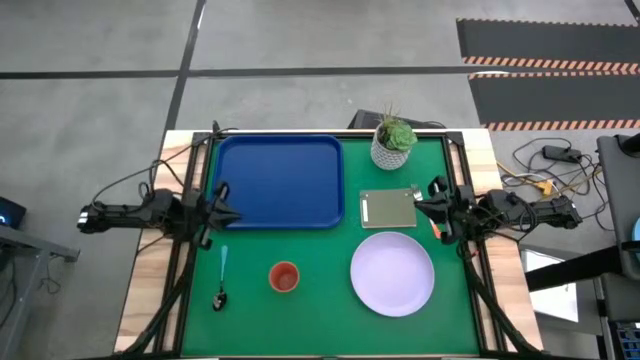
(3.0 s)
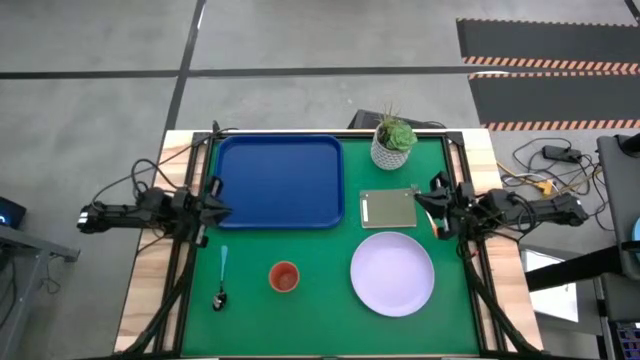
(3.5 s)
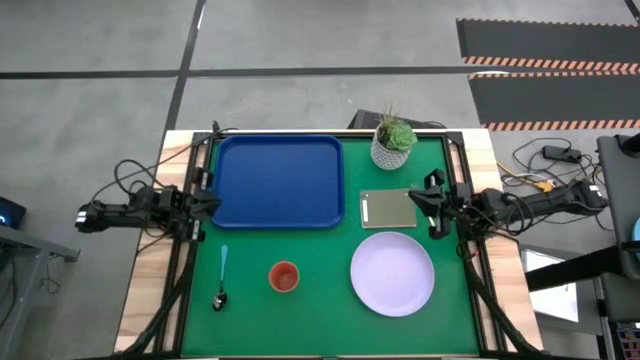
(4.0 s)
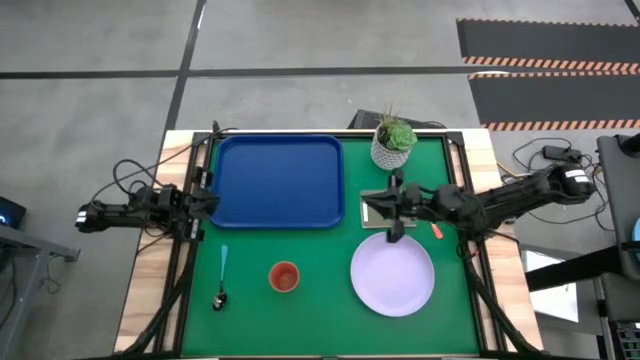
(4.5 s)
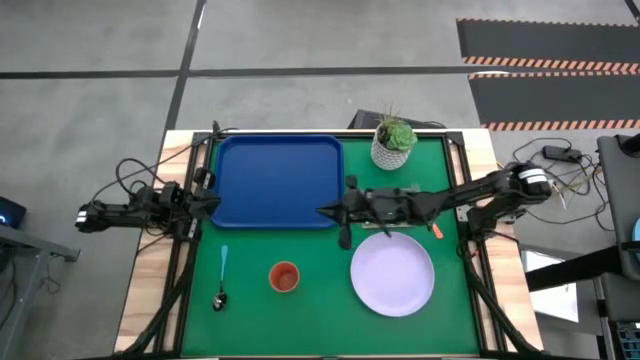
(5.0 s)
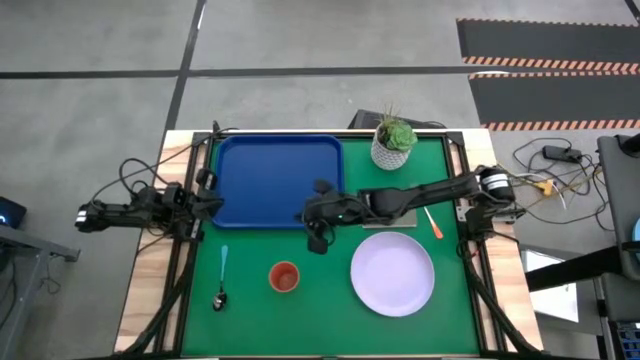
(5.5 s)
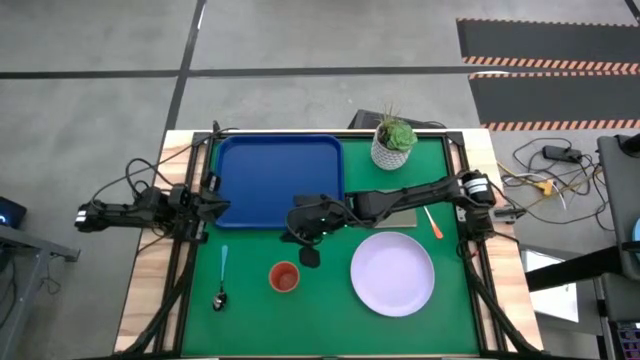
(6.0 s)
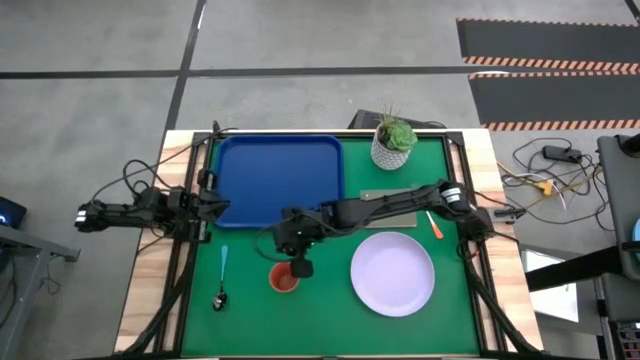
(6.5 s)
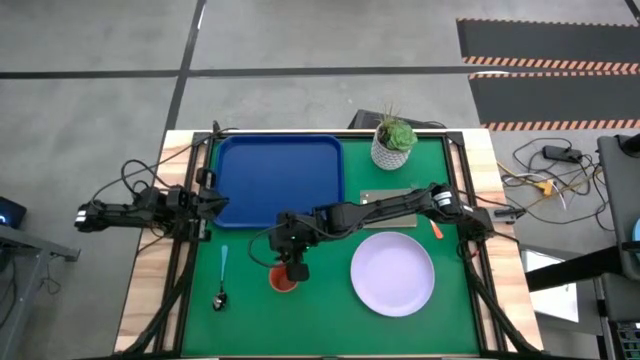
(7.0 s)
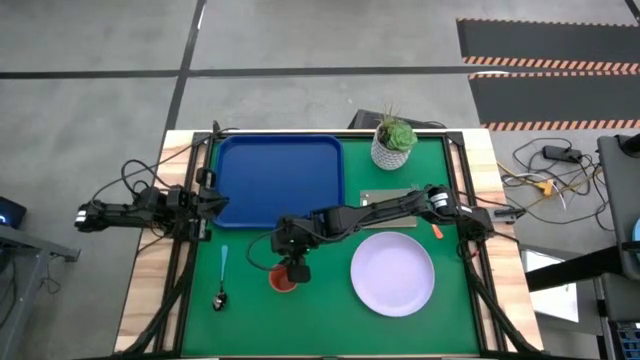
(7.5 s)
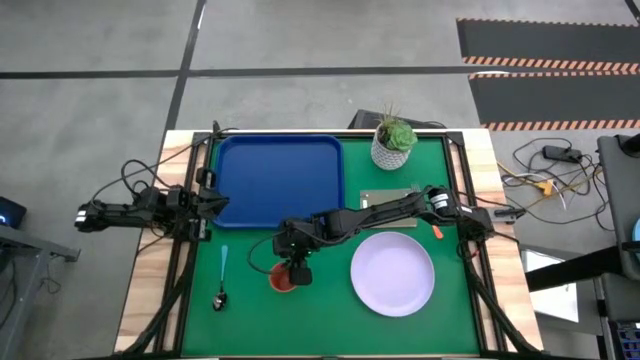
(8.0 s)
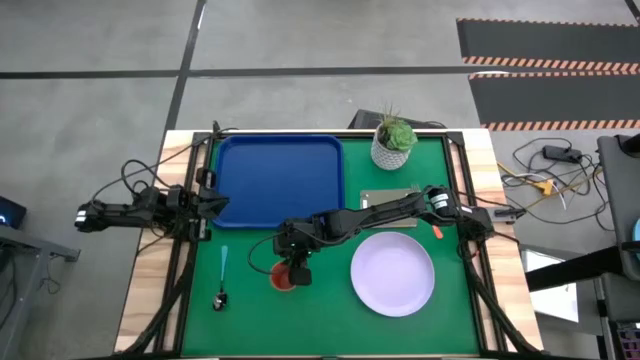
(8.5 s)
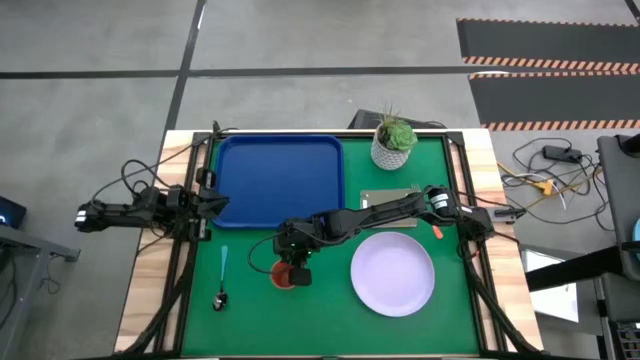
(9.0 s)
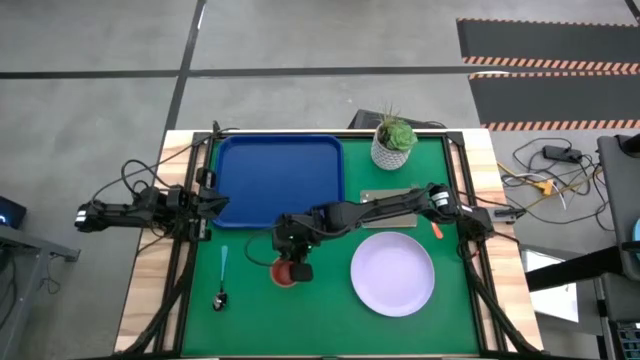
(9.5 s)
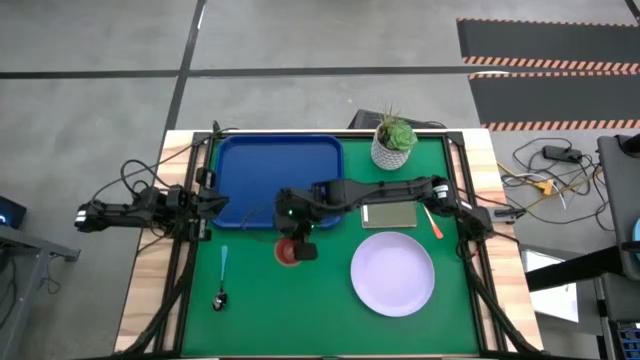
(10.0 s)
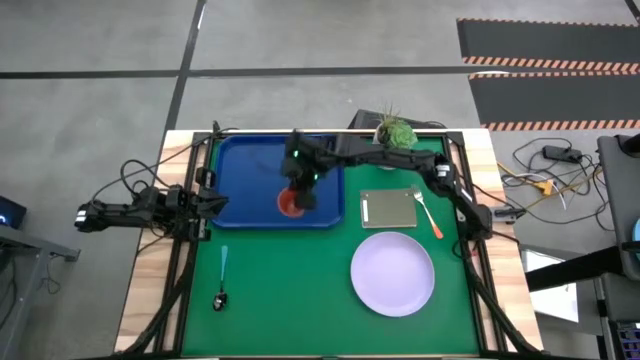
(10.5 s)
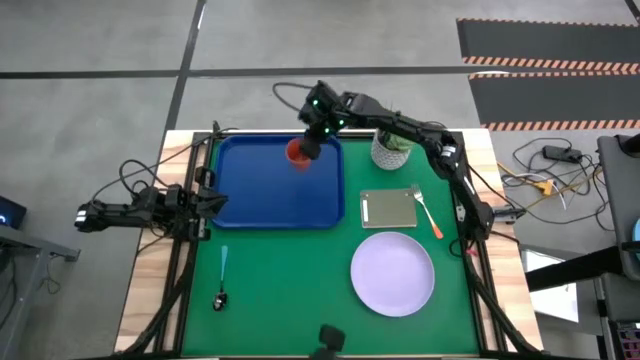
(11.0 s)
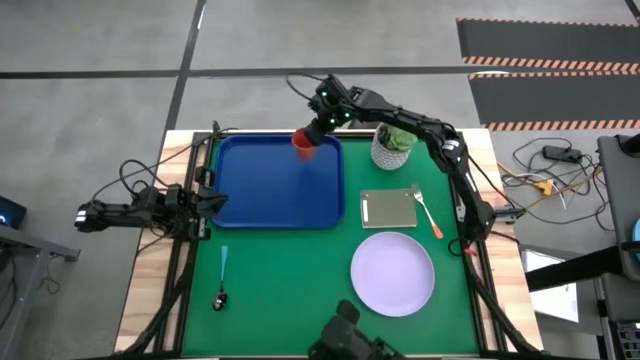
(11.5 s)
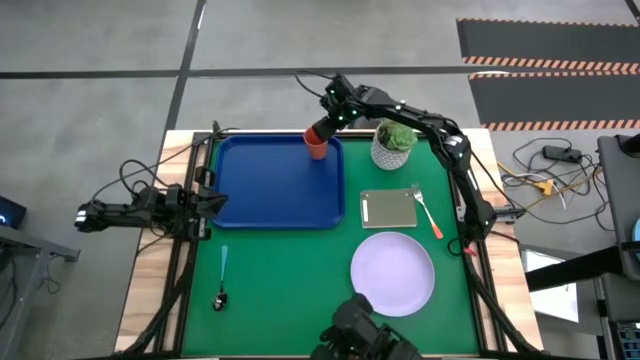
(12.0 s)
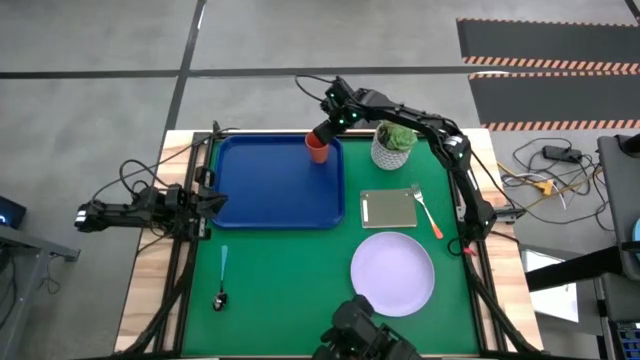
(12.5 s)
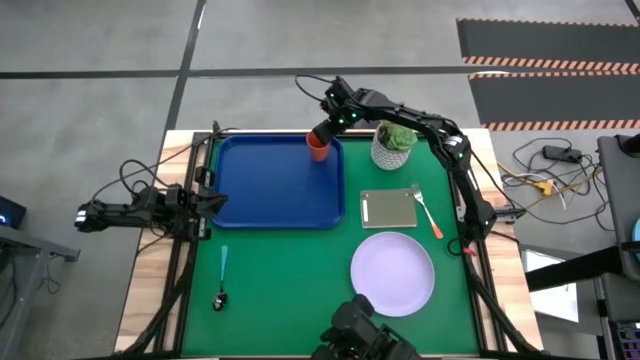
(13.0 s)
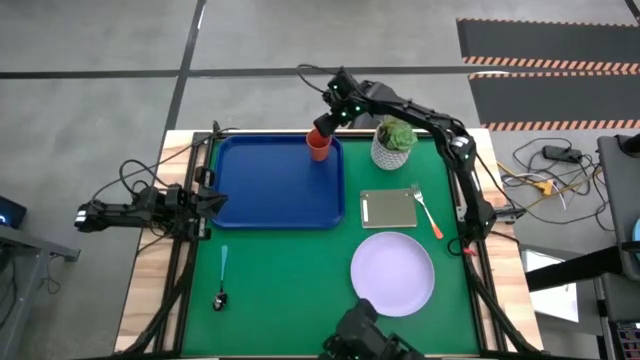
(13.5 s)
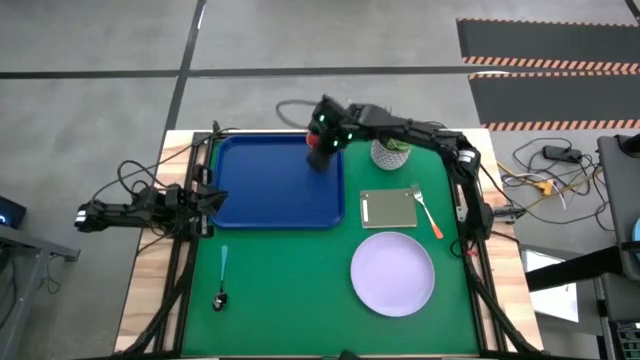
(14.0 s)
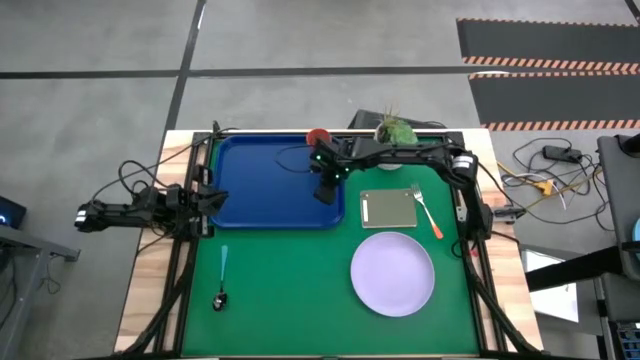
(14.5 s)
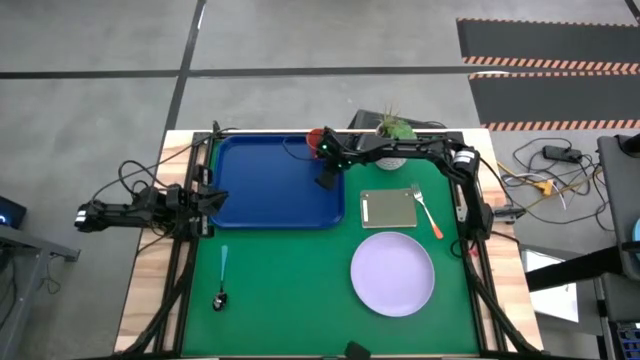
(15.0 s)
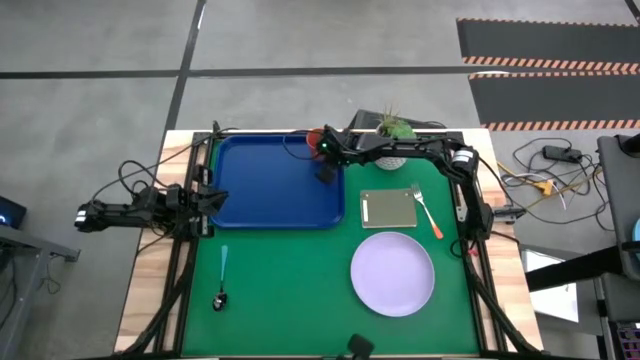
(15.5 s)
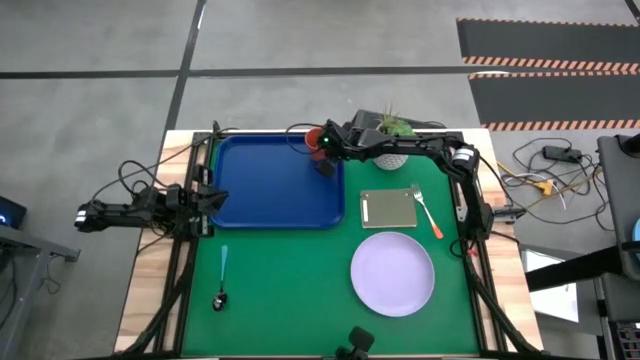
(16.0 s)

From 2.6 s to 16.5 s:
Task: Pick and place plate/cup/fork/spoon on tray
Put the orange cup to the top right side of the dark blue tray

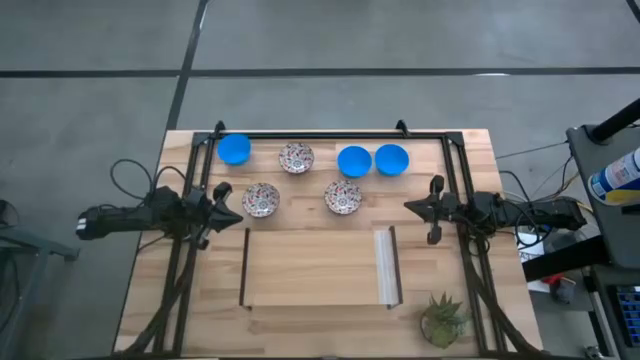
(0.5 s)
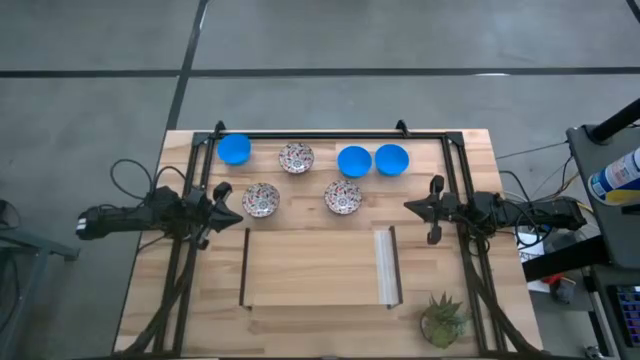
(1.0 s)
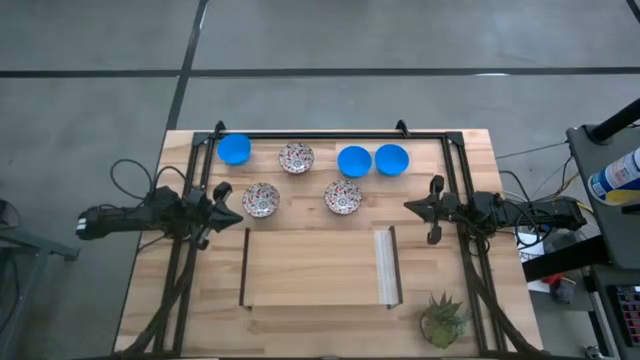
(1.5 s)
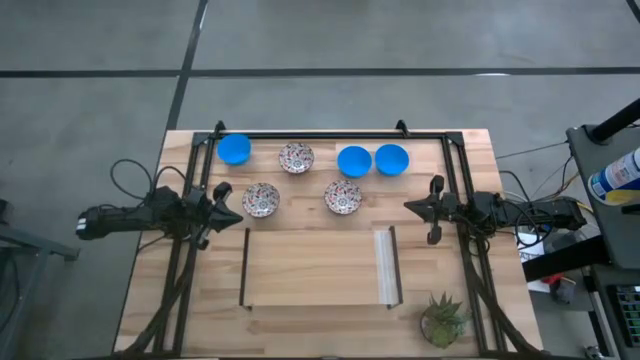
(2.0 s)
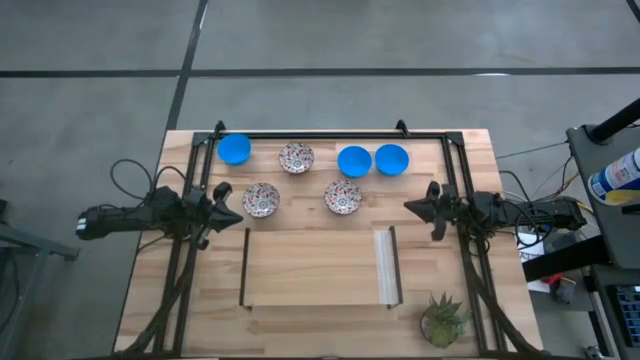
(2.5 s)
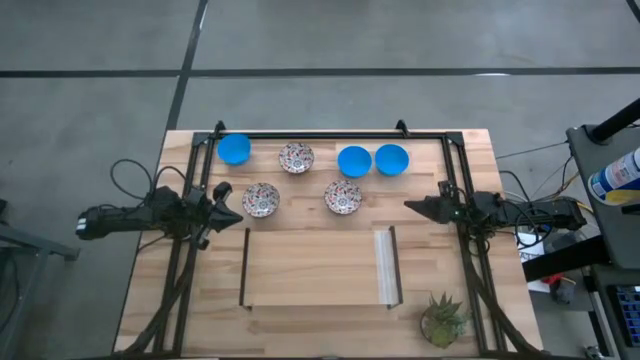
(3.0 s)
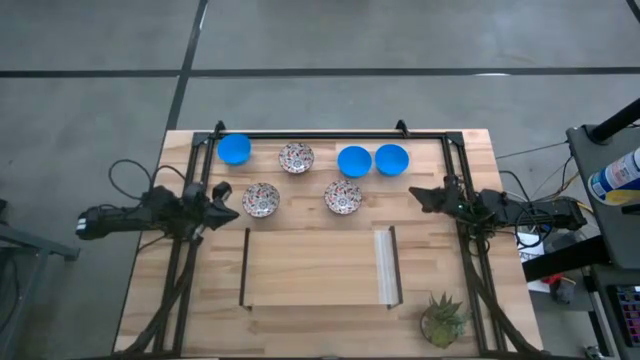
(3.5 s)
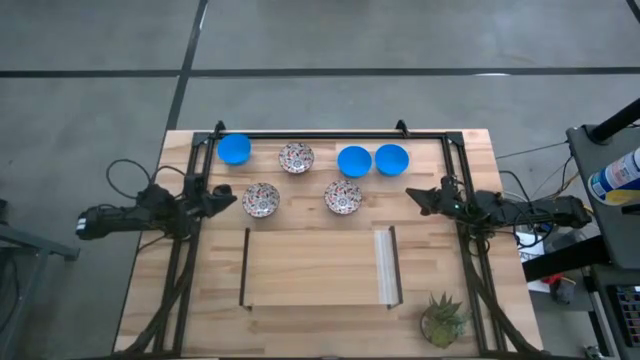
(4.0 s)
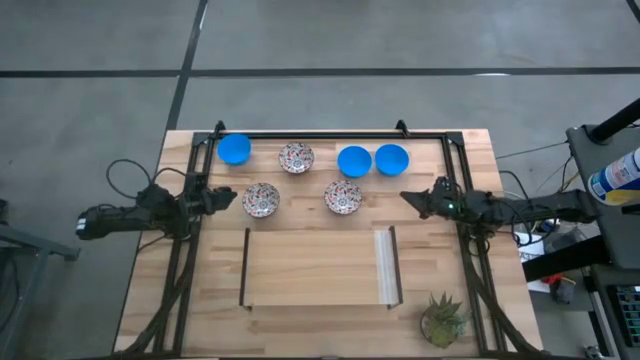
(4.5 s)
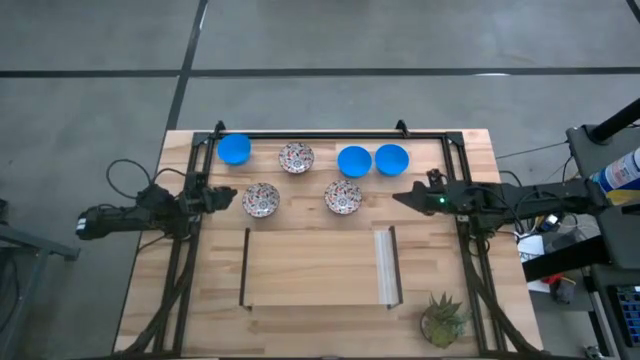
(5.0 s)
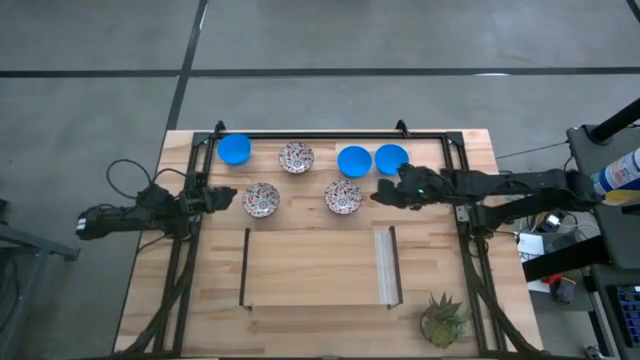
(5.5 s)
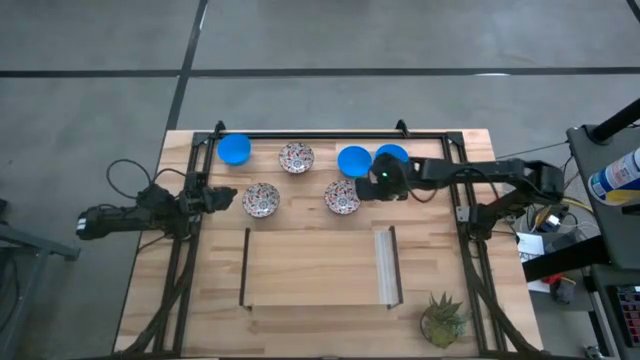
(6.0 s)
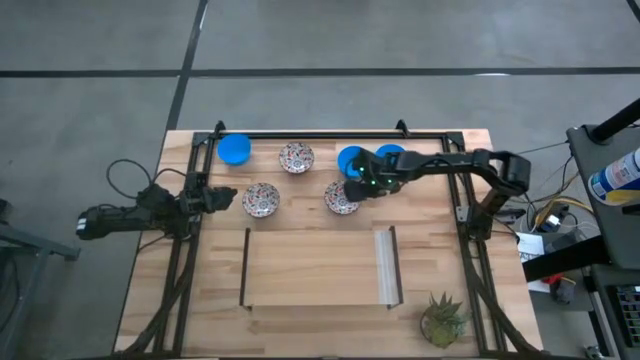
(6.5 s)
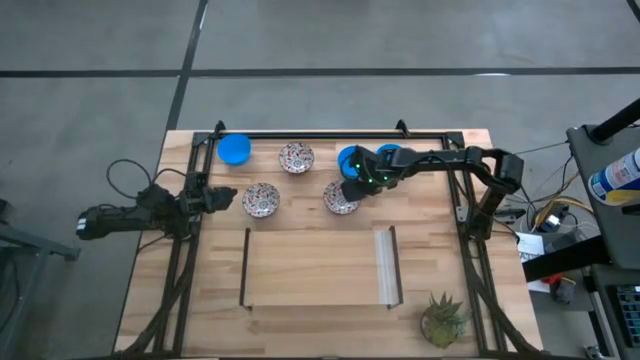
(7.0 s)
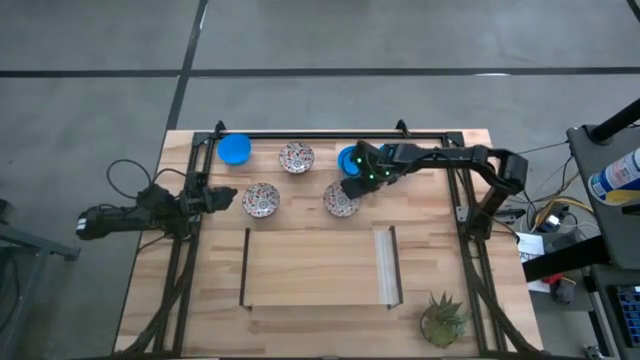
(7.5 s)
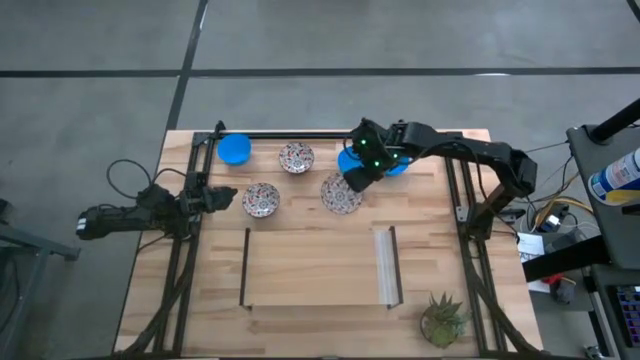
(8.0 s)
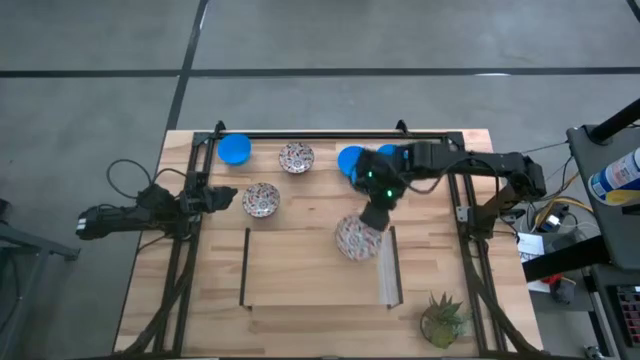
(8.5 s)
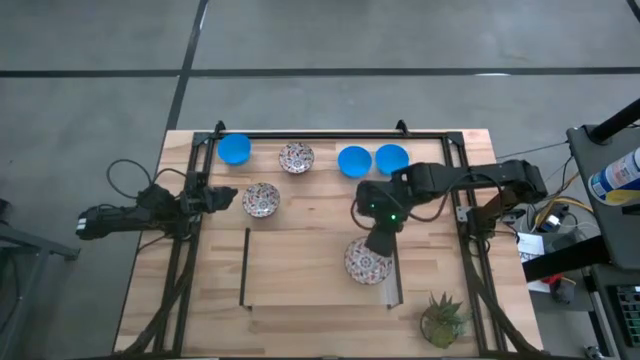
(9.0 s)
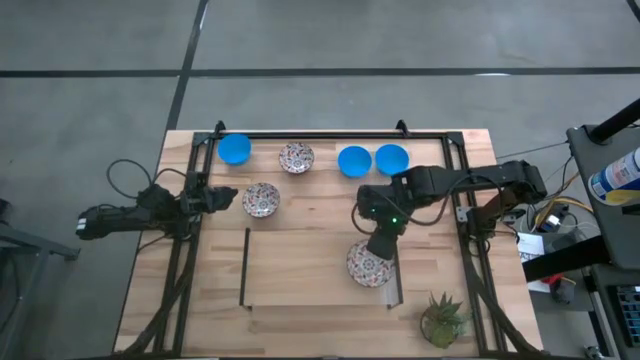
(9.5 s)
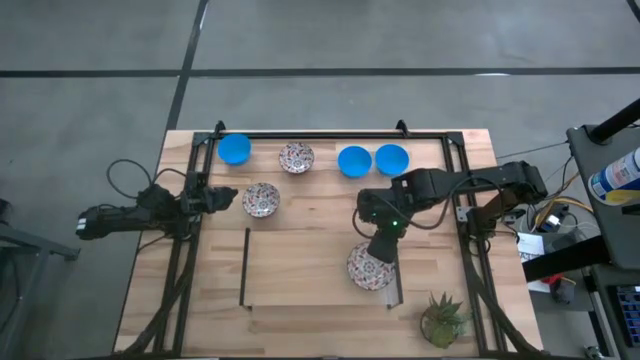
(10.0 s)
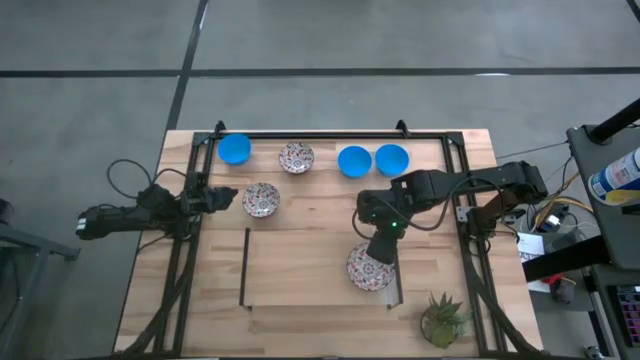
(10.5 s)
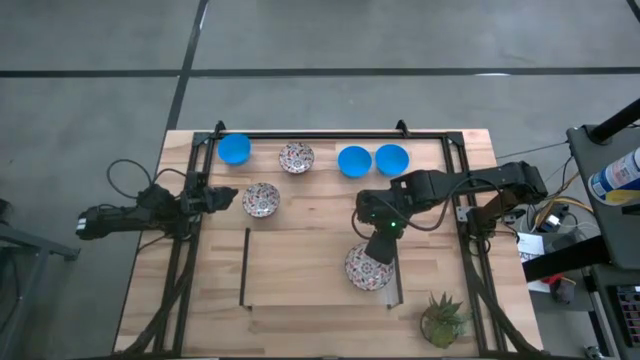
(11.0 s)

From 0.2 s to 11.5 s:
Task: Pick & Place Mini bowls
Put the right white patterned bowl on the shelf
